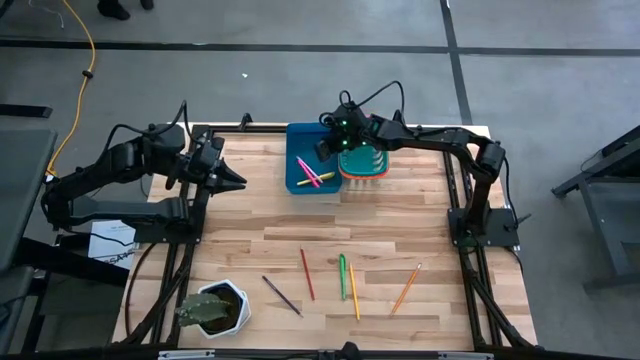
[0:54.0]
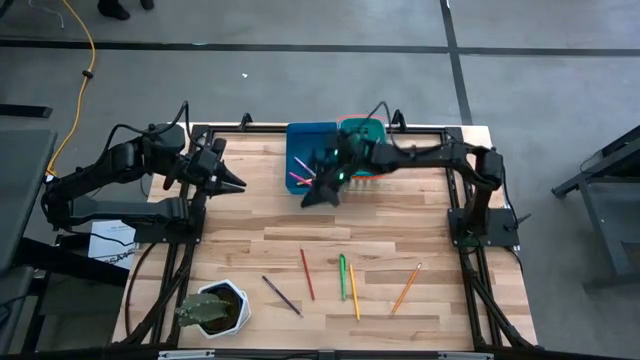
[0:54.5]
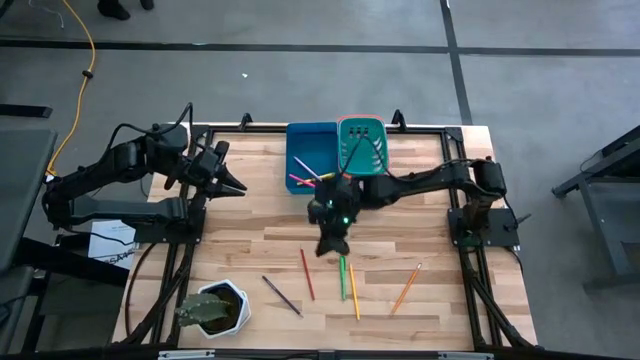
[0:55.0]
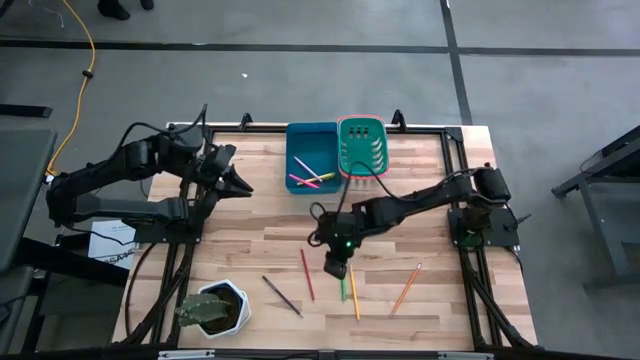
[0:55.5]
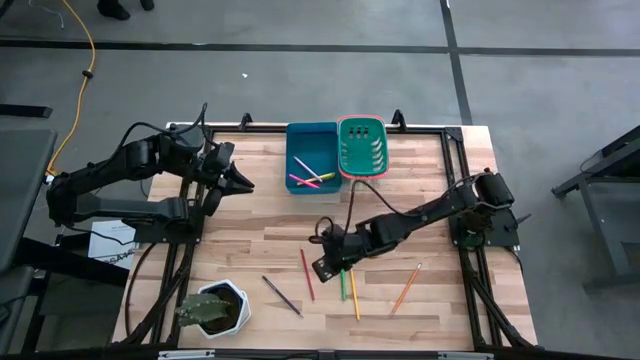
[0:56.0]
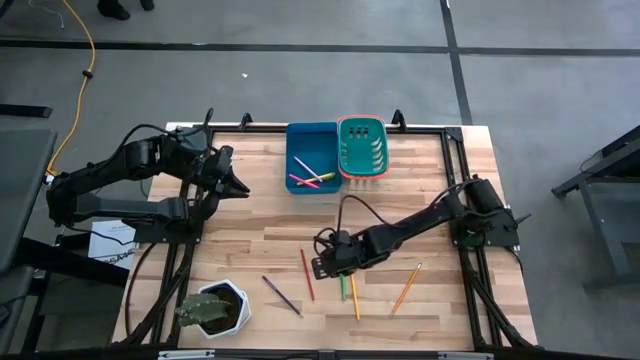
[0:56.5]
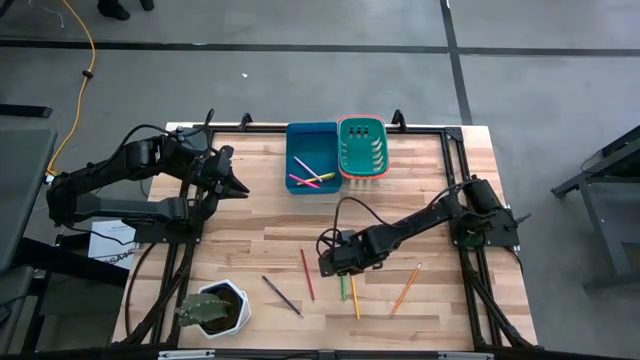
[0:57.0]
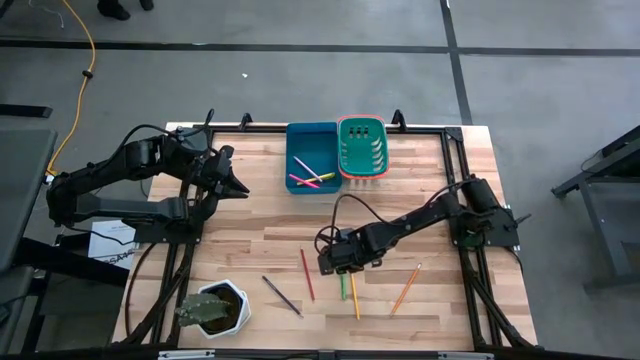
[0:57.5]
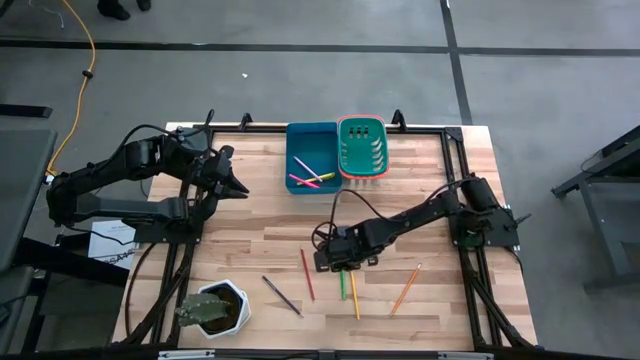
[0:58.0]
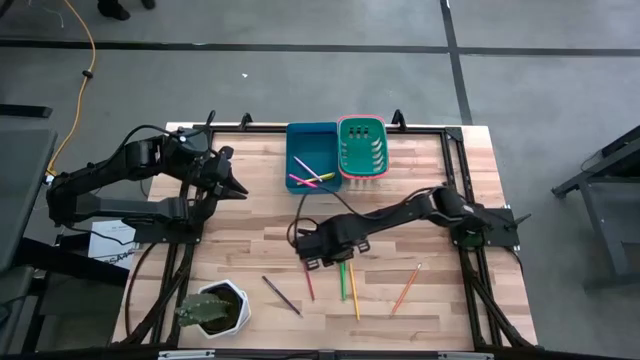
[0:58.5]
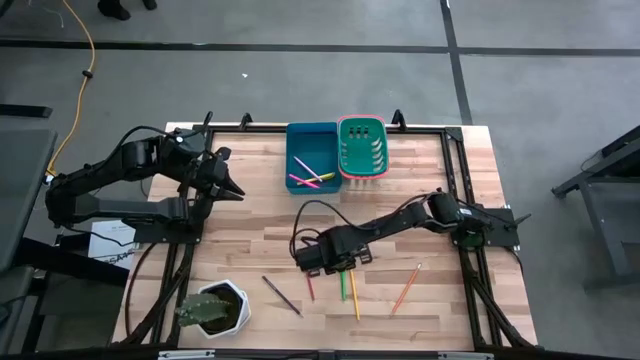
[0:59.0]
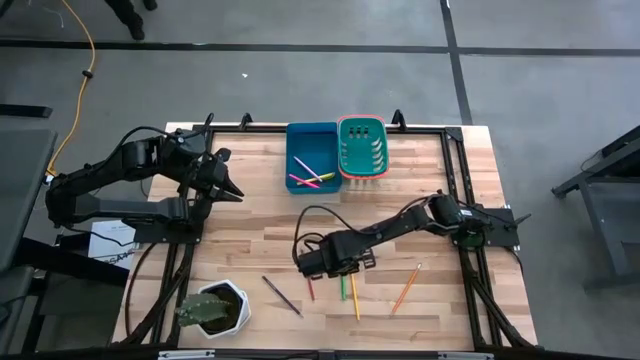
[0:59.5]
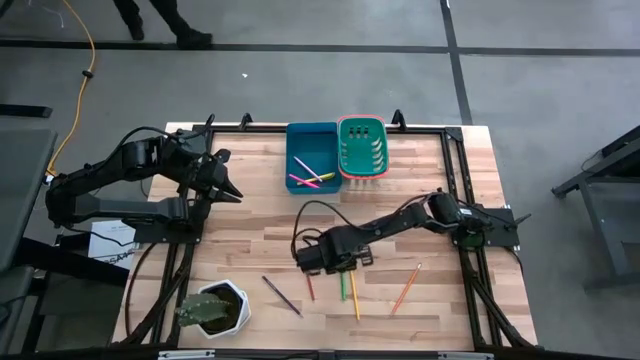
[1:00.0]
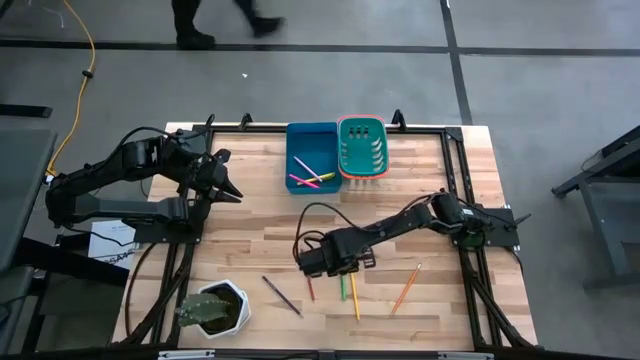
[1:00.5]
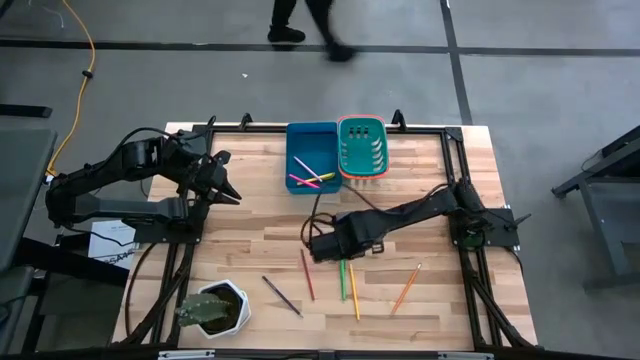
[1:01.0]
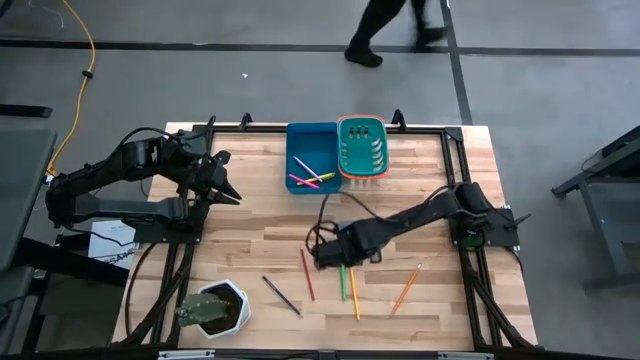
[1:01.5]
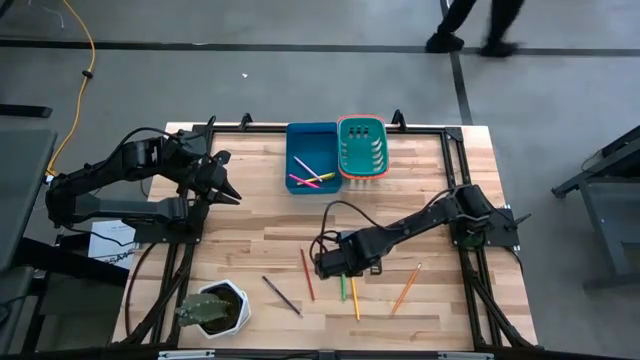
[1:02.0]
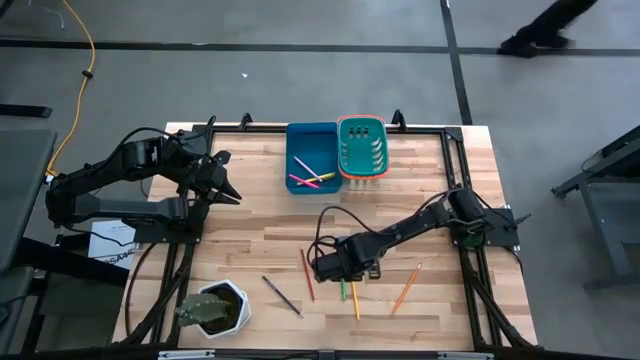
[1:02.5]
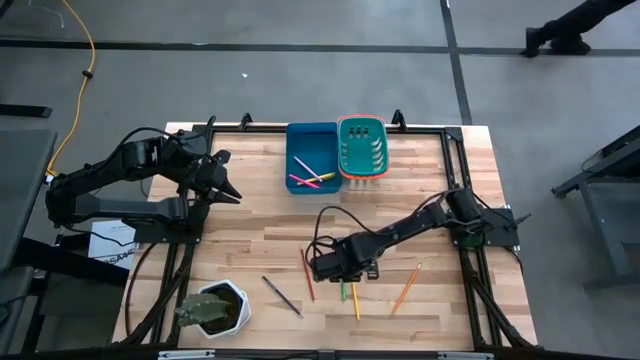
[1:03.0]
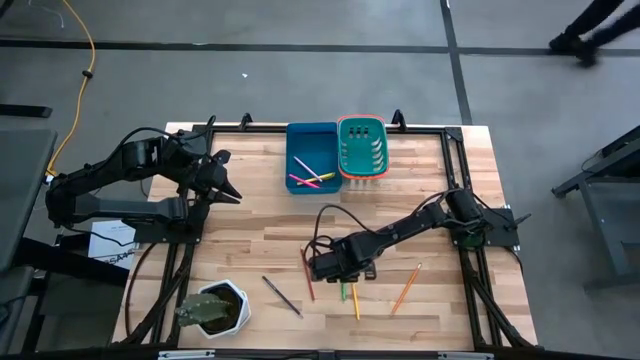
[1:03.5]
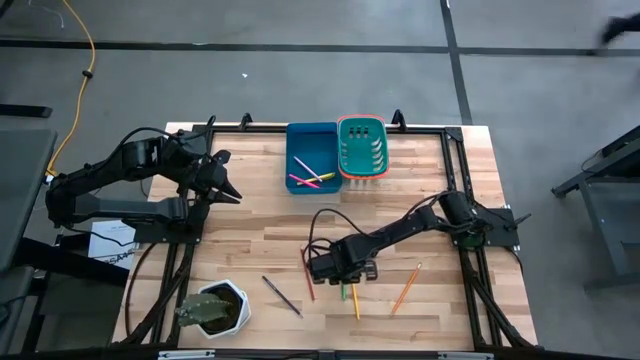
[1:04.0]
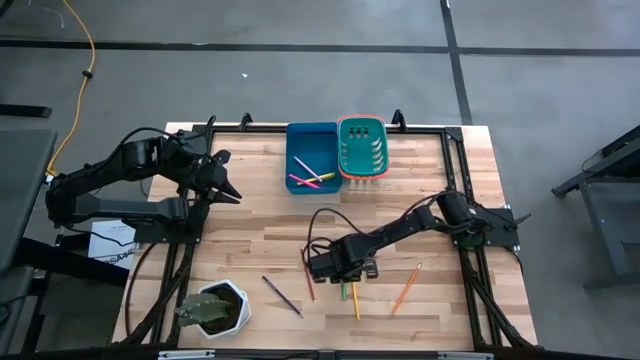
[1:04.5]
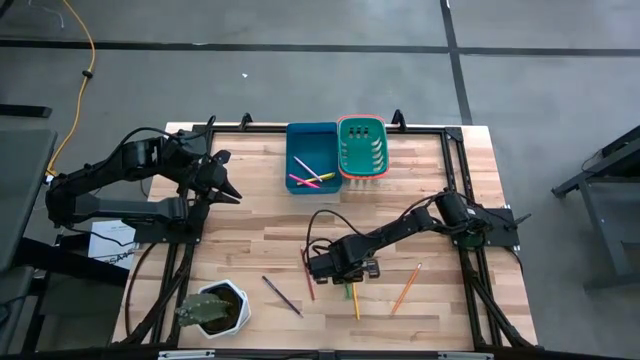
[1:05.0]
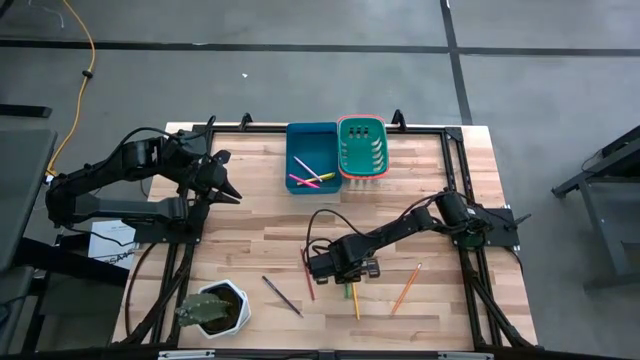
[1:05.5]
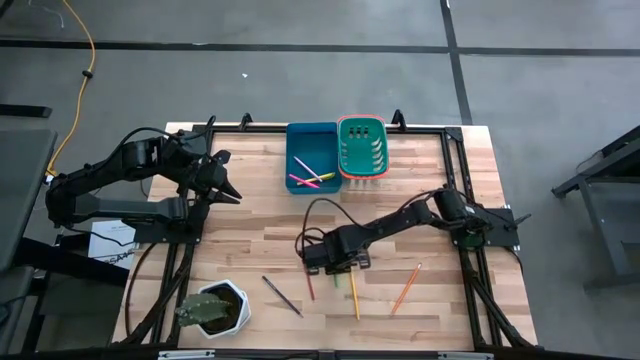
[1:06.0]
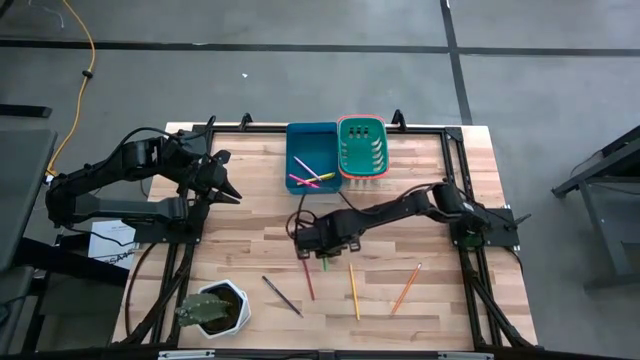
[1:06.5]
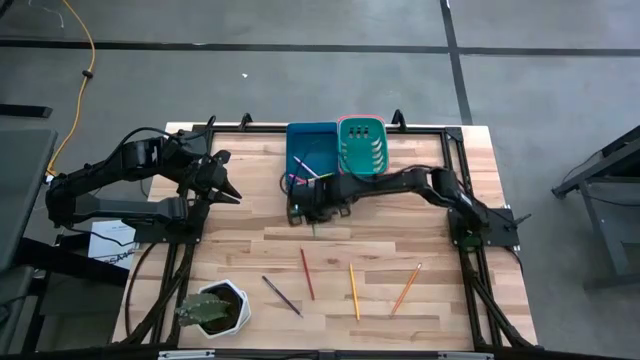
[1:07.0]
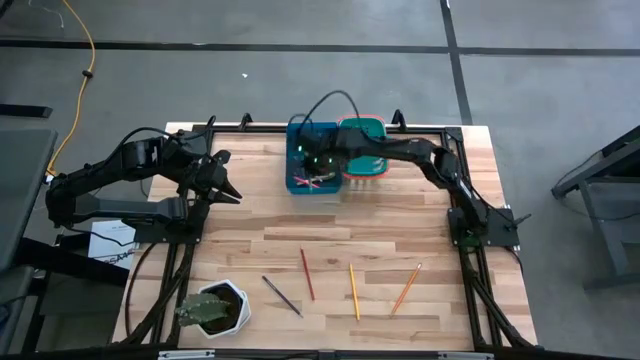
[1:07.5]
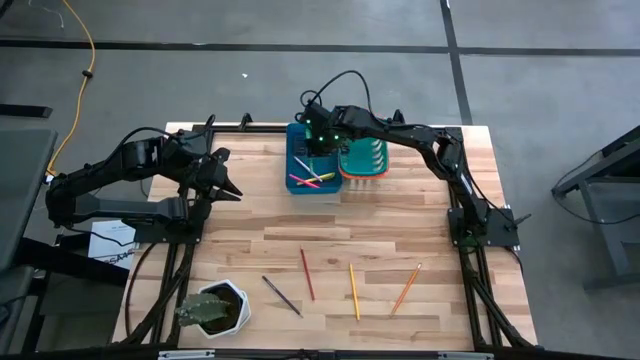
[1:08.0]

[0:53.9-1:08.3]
Task: Sort pens & pencils
Put the green pen into the blue bin

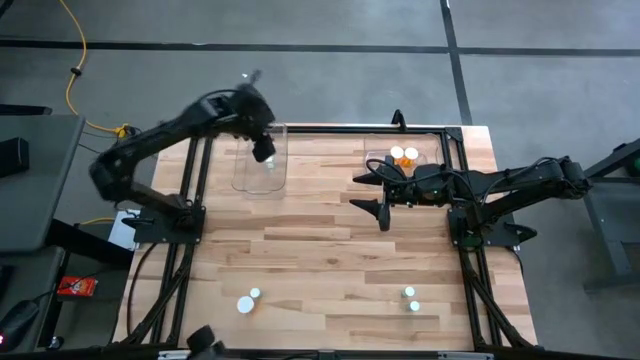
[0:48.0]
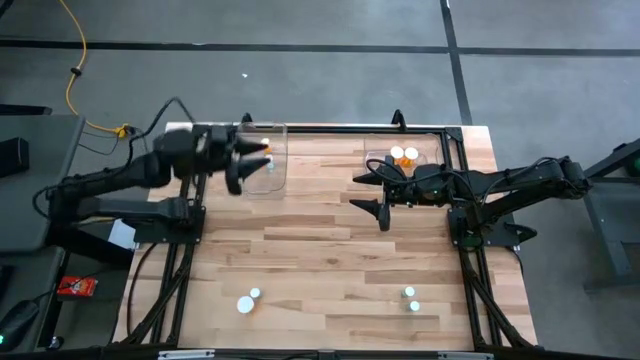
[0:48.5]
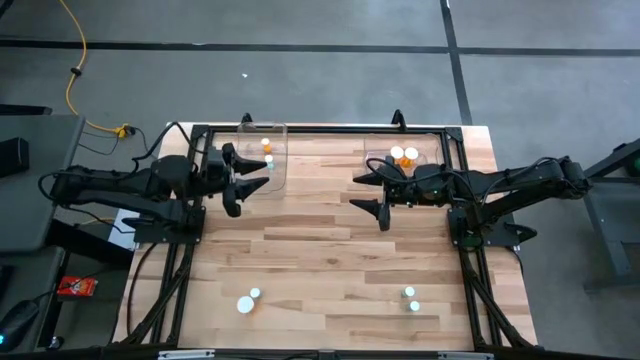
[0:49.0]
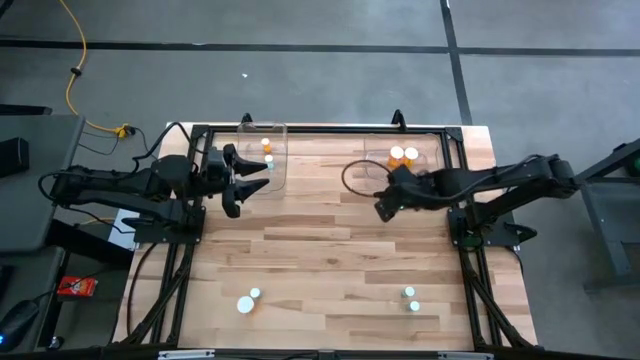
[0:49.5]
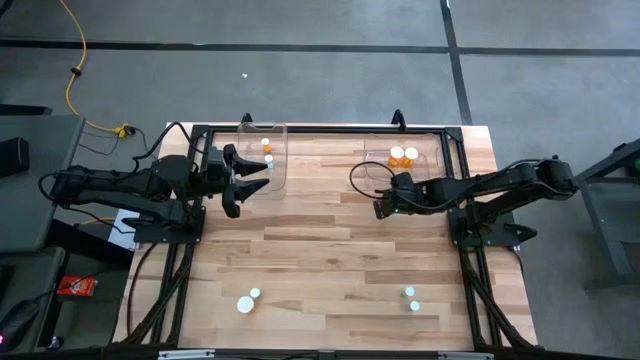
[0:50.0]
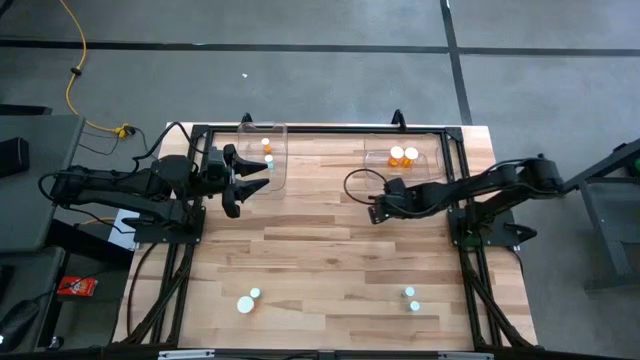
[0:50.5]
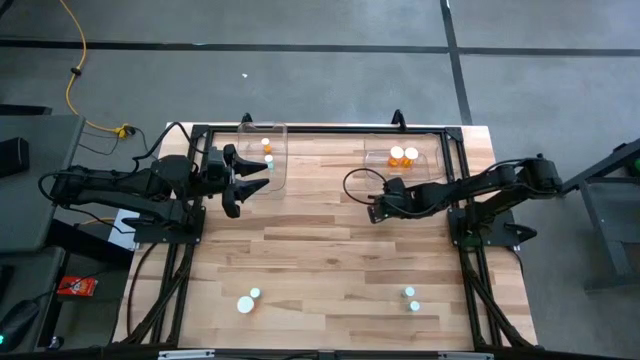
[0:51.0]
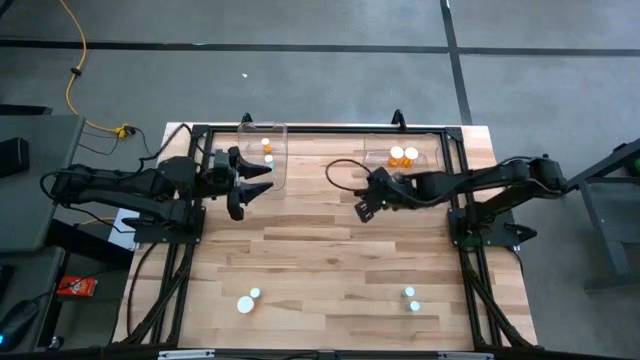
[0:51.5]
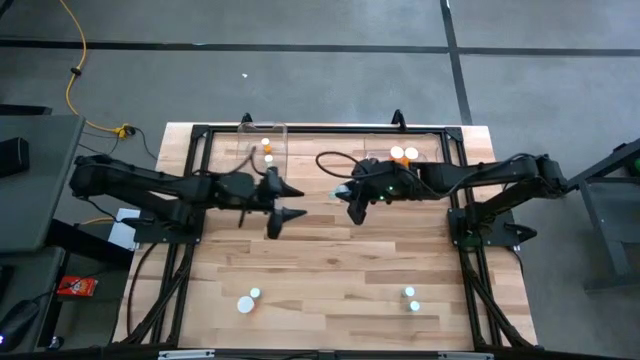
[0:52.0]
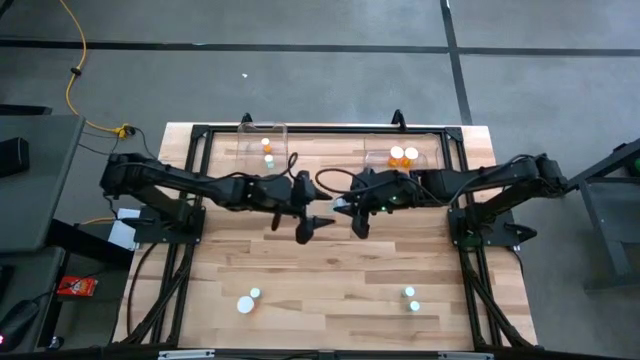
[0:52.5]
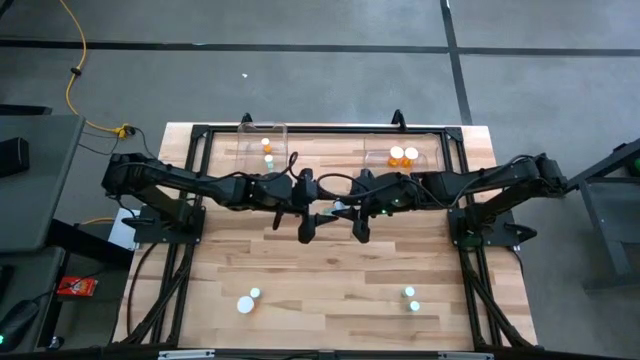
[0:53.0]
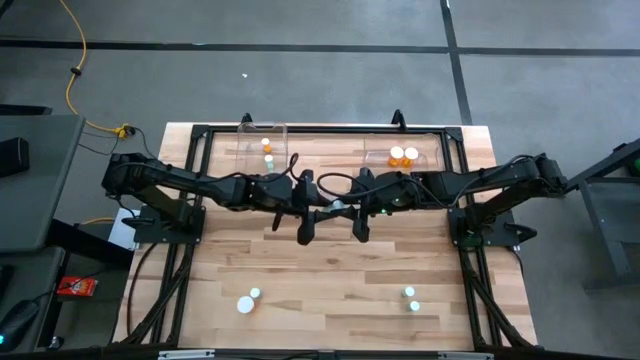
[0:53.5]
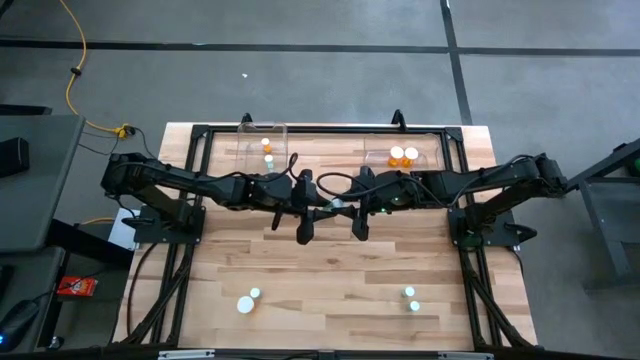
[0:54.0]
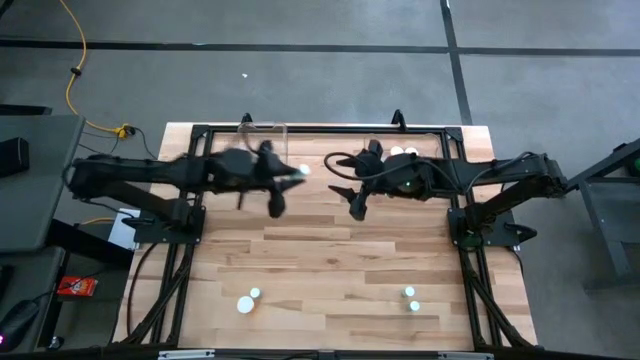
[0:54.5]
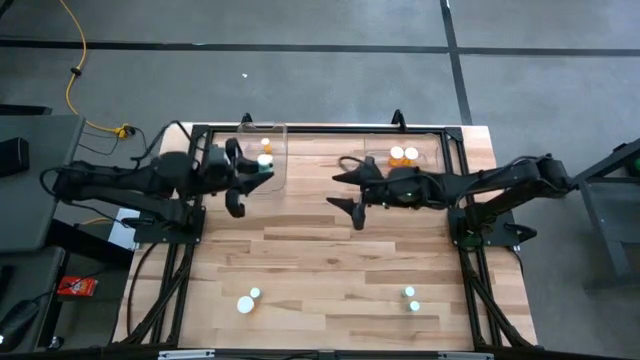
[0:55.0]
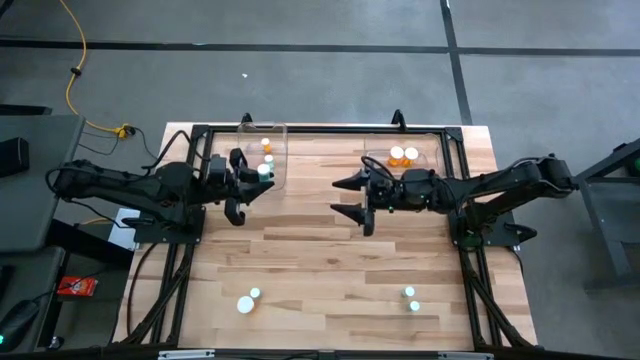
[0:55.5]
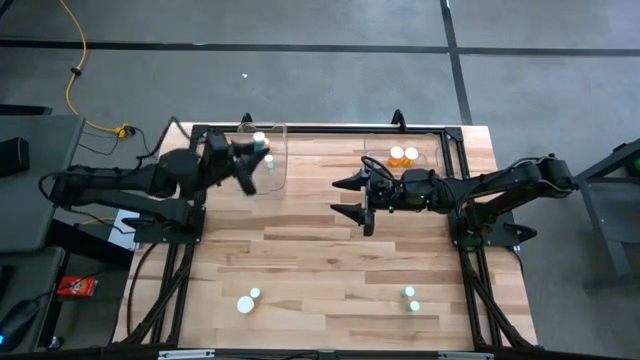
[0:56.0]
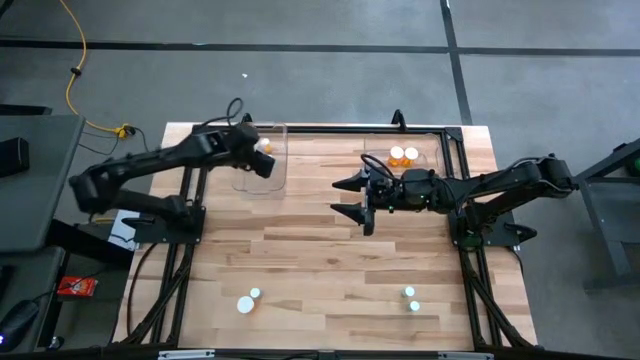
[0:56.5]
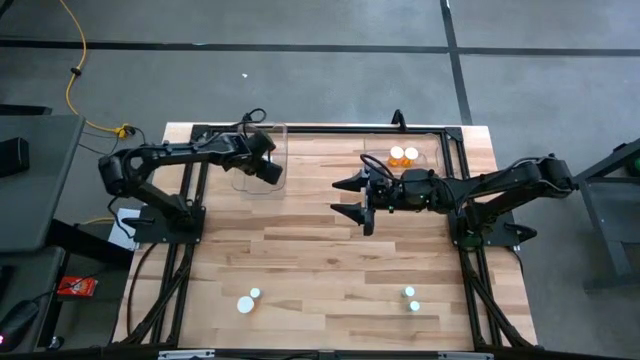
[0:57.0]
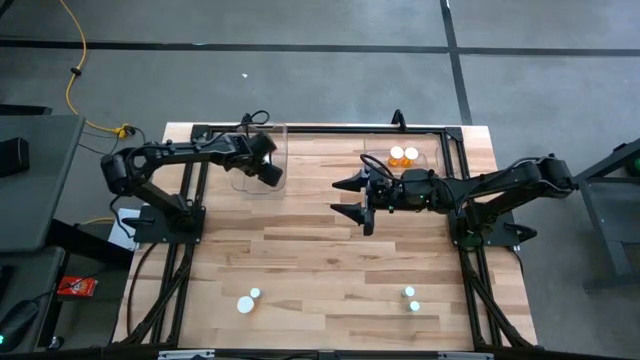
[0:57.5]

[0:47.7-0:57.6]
Task: Pick and place medicine bottles into bin by pill shape (circle, oval)
Put the blue pill bottle into the right transparent bin
